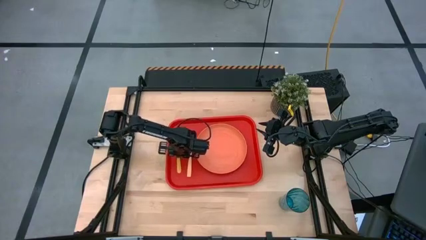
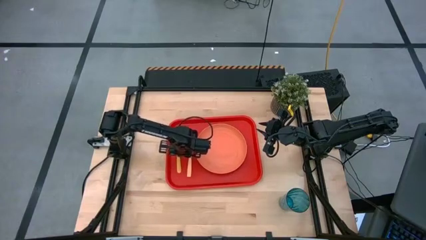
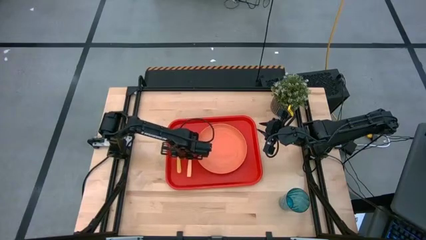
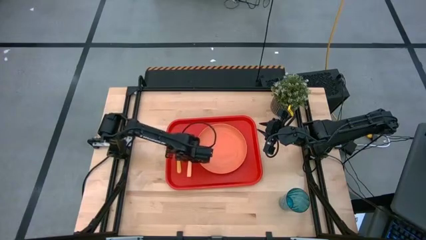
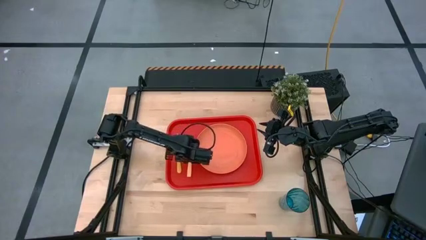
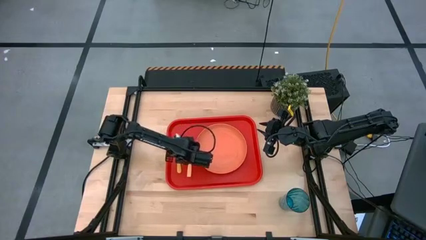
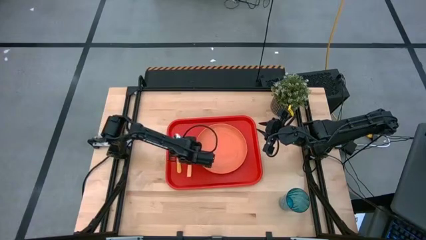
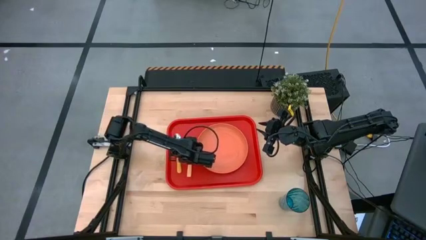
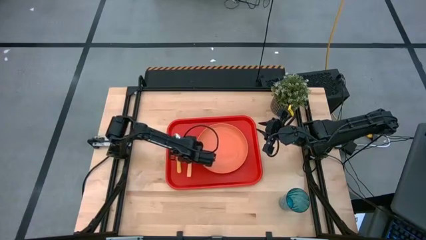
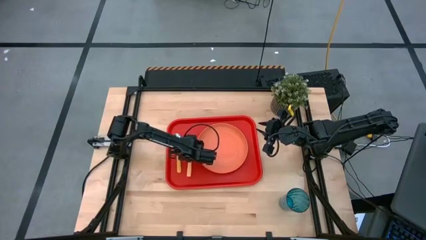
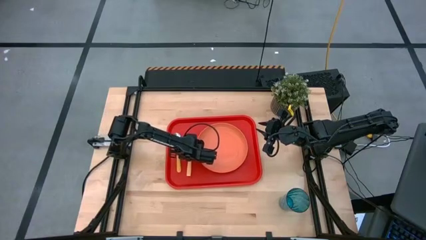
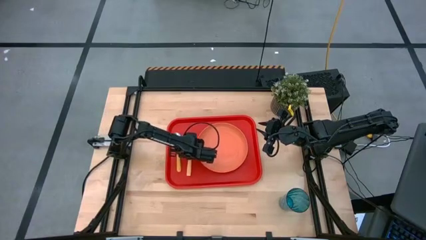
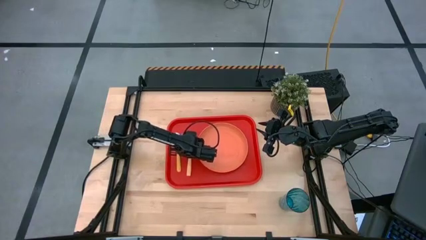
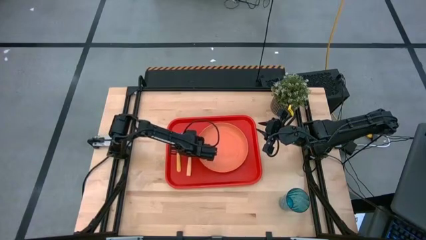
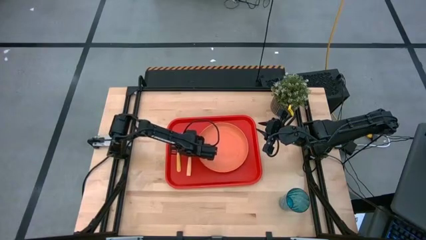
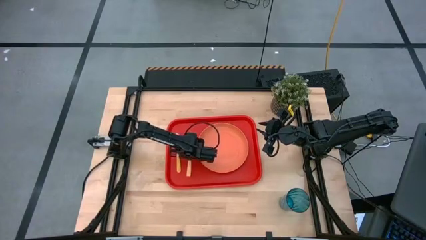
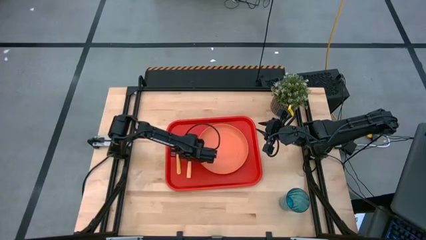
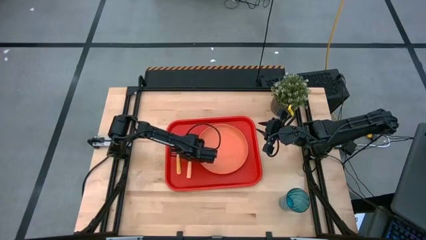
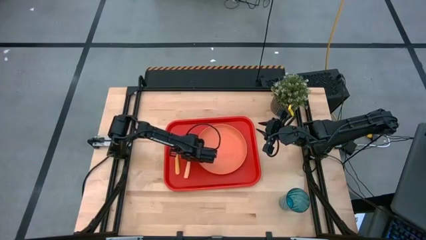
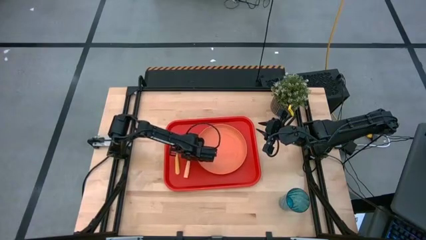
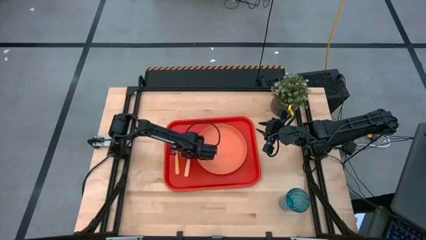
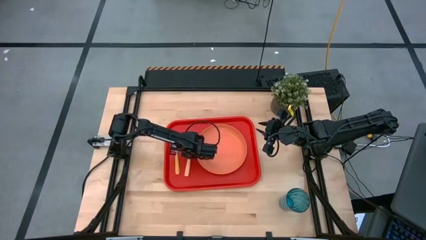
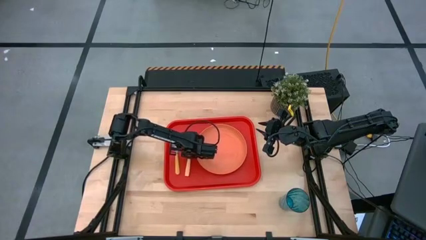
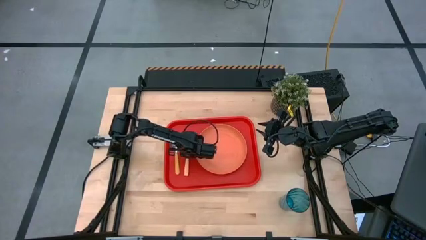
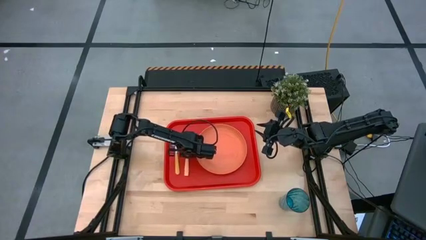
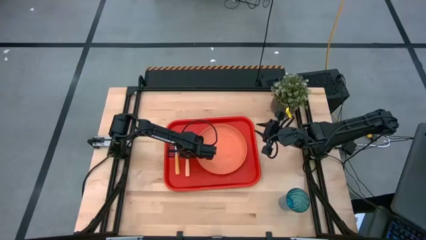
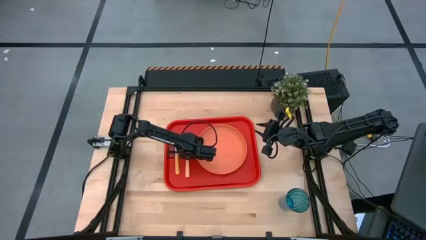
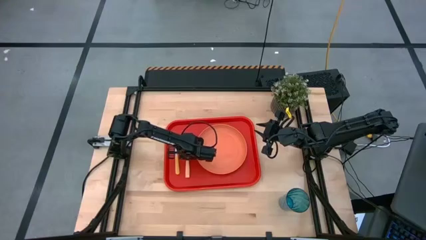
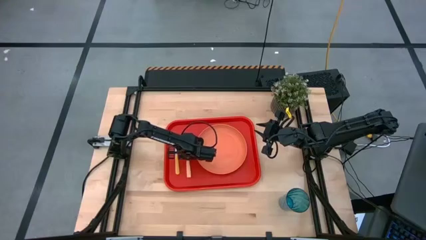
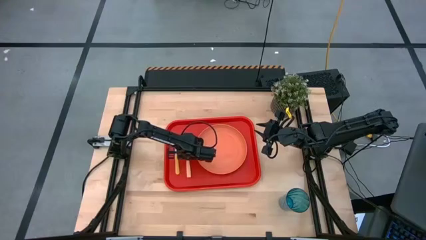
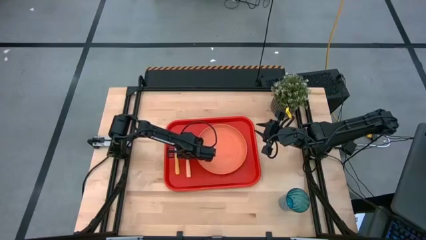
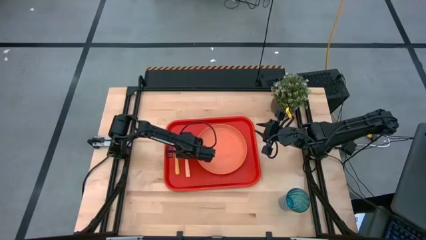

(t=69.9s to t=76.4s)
Task: Pick and place plate/cup/fork/spoon on tray
Adjust the light orange fork on the orange serving tray

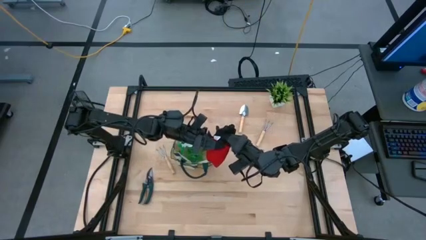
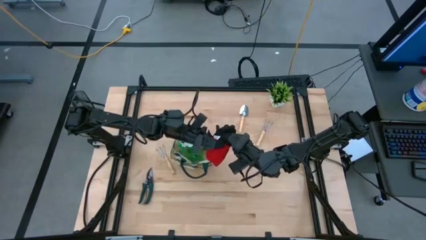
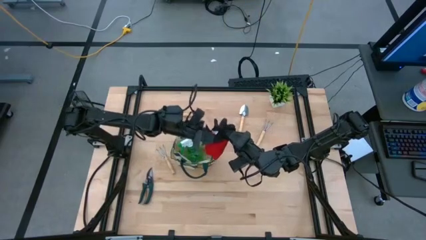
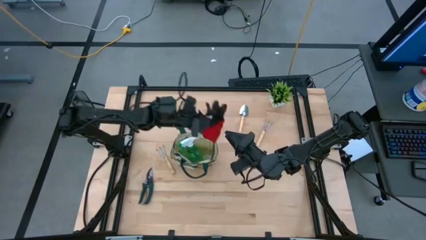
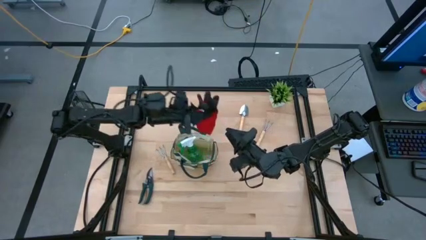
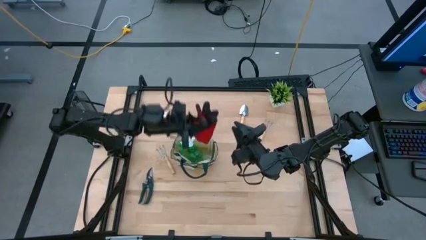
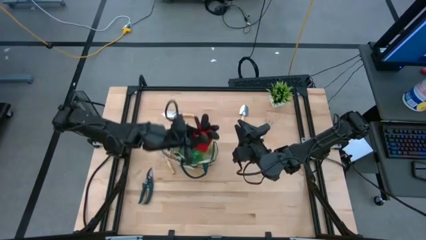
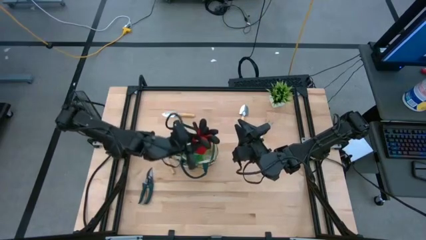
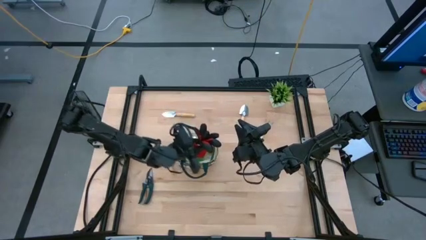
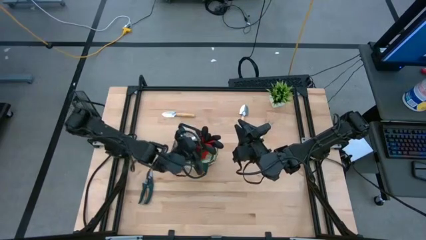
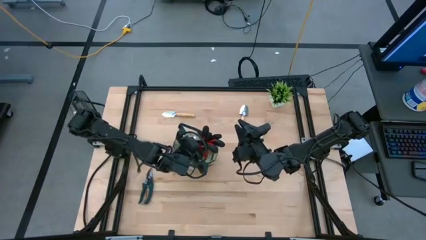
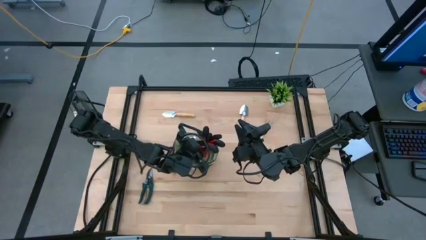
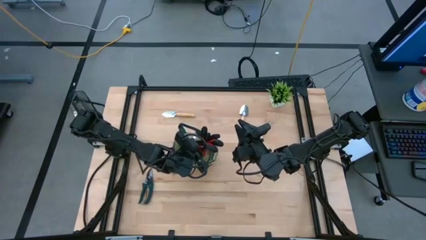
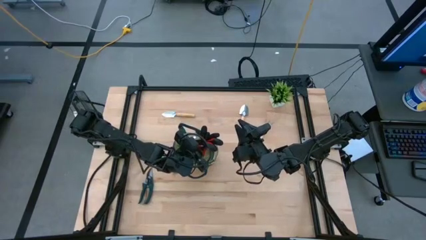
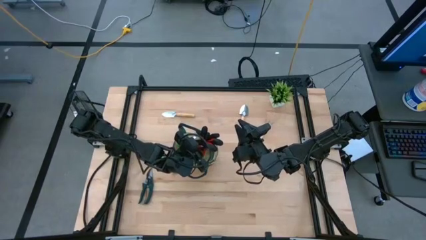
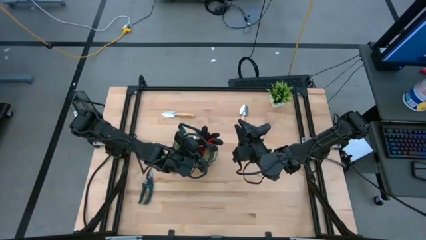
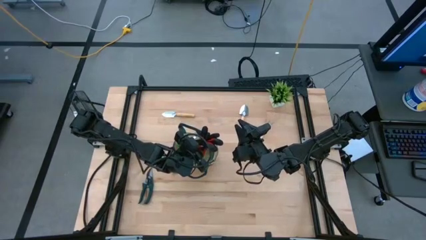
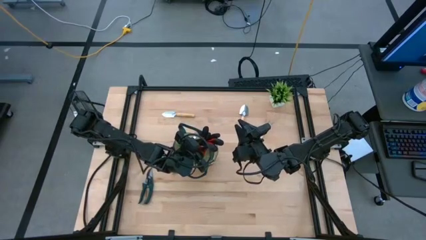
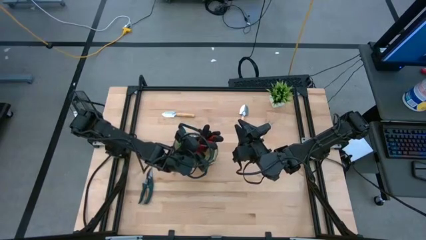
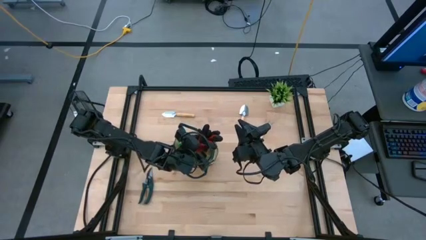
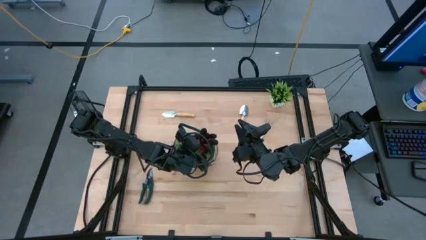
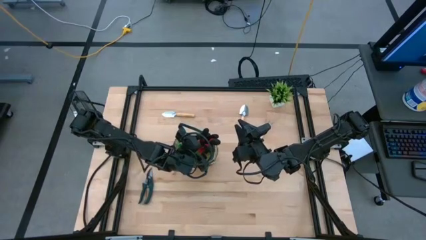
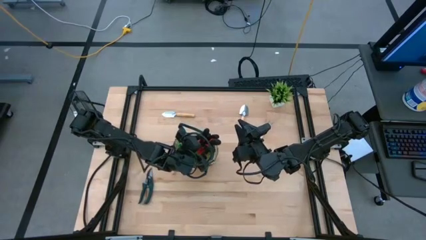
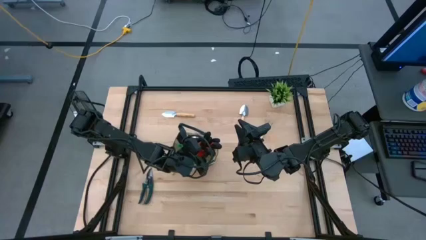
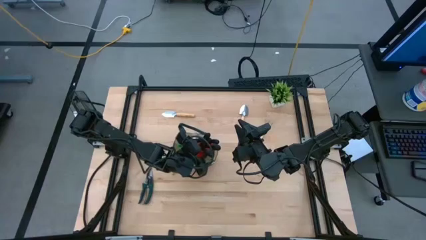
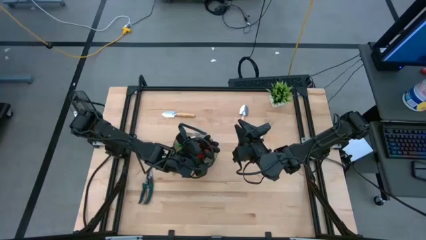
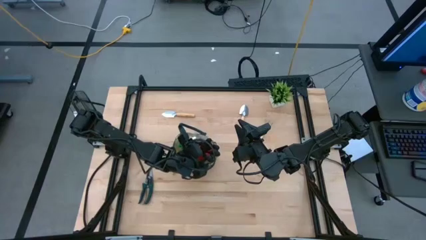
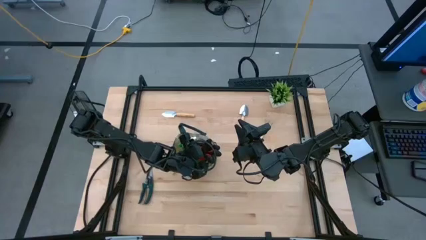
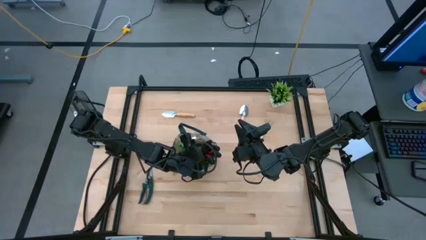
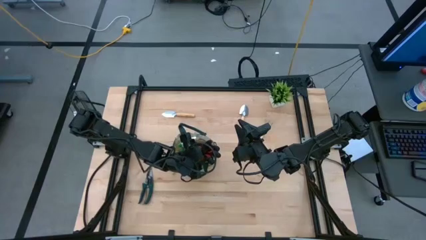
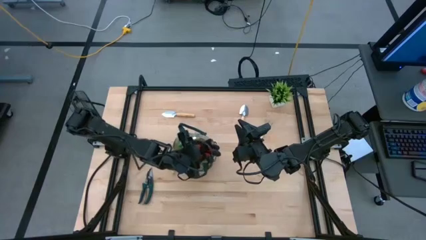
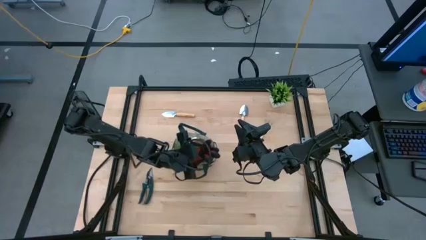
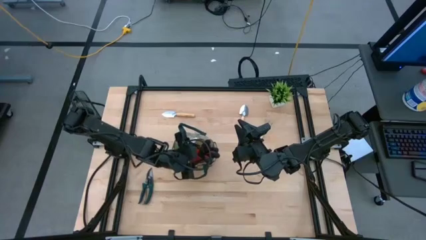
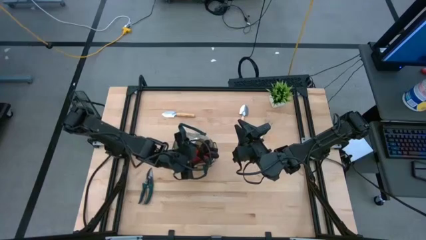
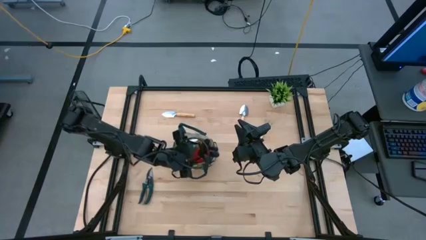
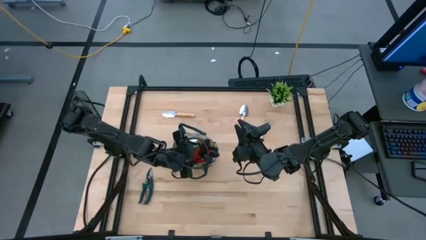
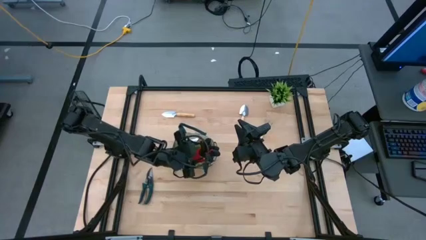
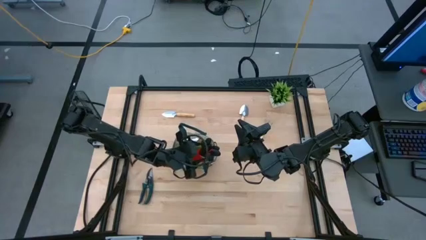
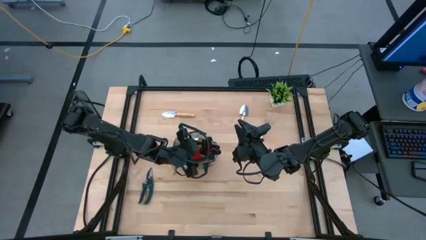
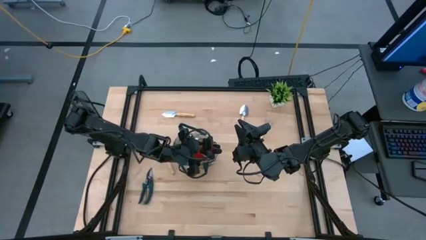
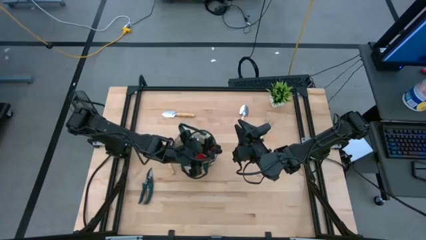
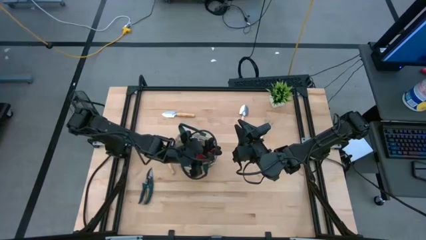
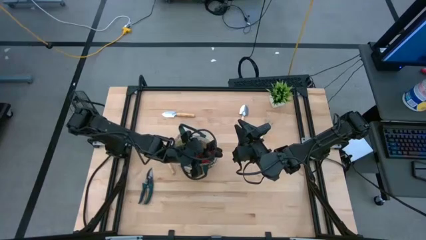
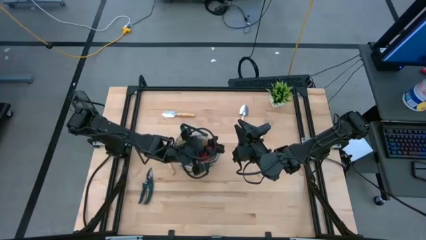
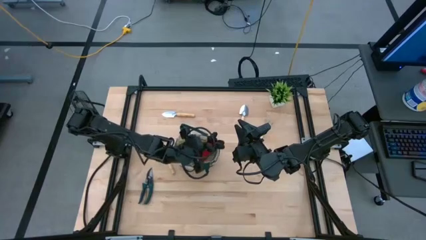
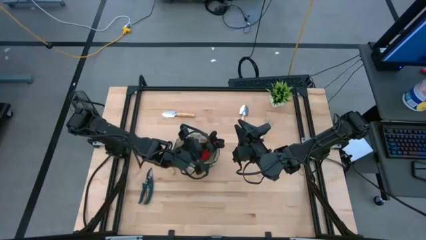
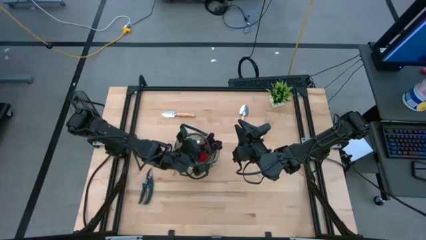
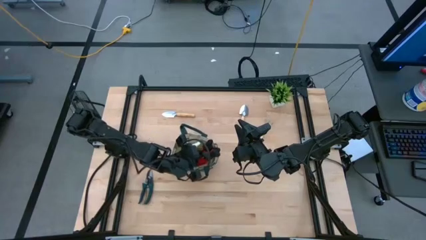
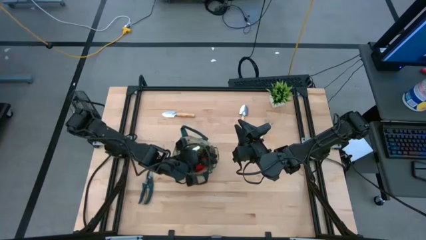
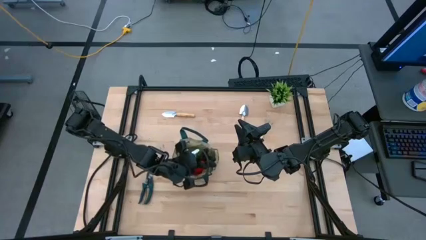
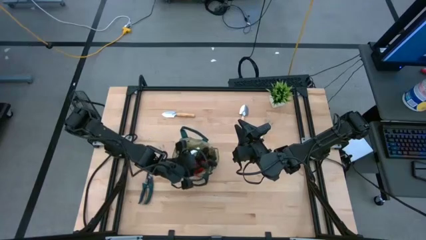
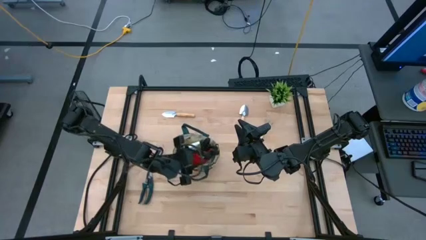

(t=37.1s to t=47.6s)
Task: Pick & Place Garden tools in Gardening bag
Put the red gloves into the brown gardening bag
